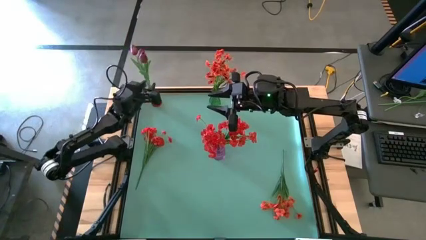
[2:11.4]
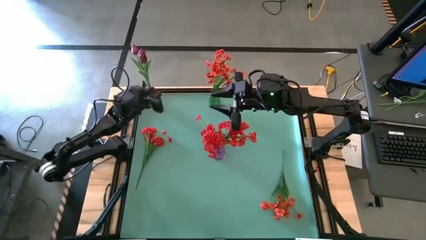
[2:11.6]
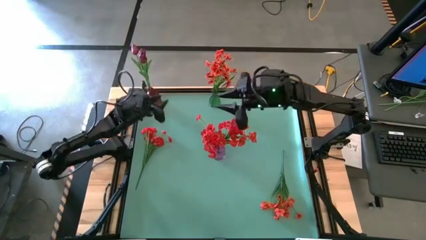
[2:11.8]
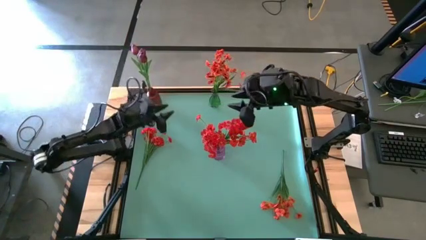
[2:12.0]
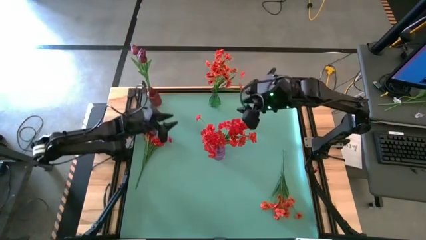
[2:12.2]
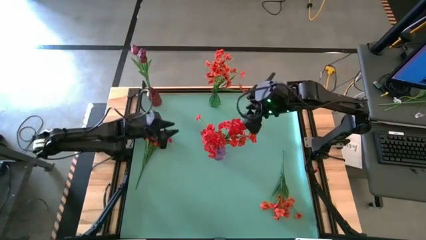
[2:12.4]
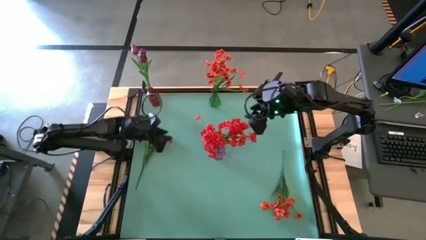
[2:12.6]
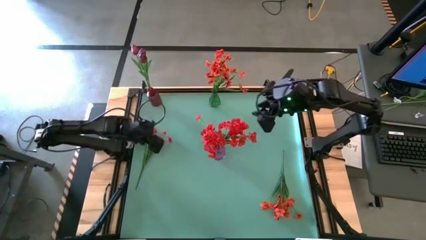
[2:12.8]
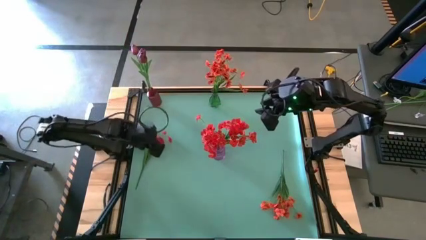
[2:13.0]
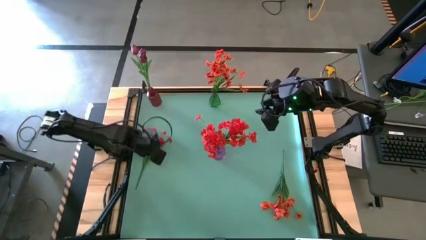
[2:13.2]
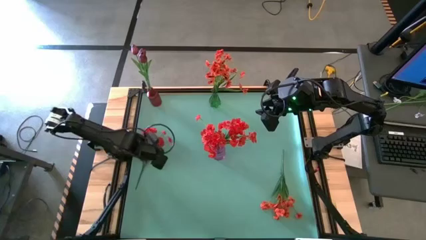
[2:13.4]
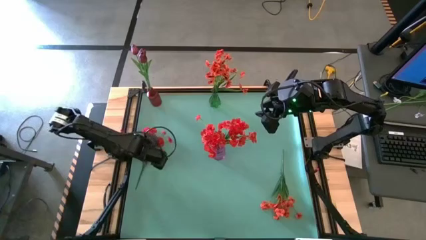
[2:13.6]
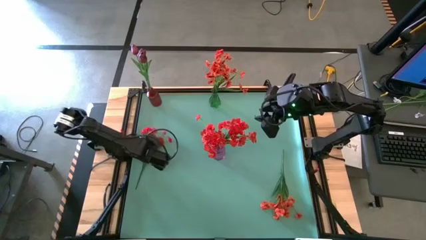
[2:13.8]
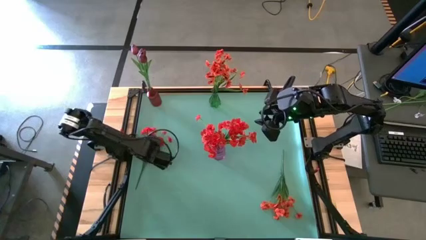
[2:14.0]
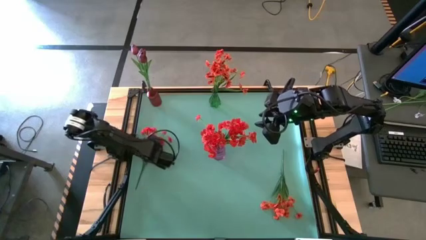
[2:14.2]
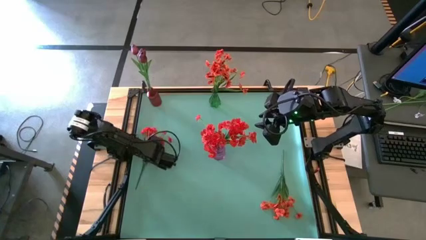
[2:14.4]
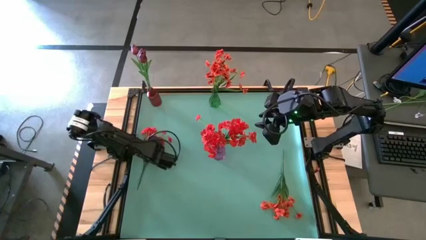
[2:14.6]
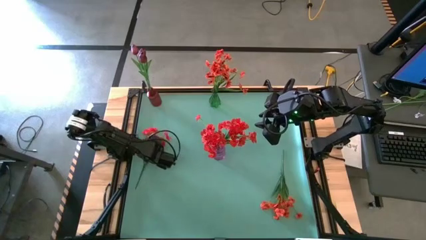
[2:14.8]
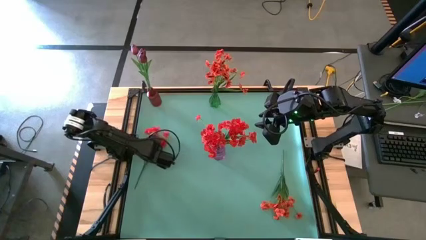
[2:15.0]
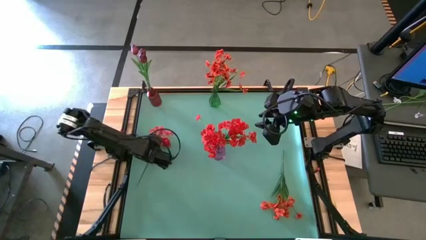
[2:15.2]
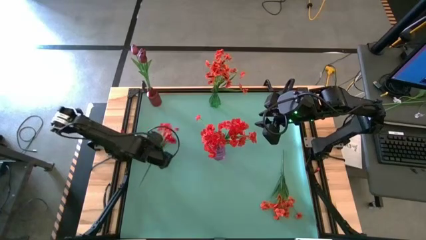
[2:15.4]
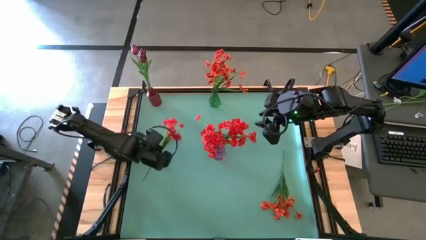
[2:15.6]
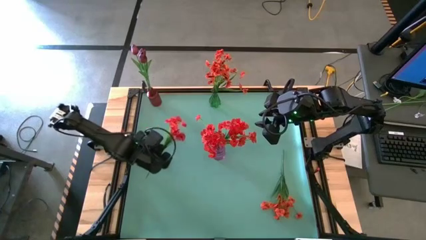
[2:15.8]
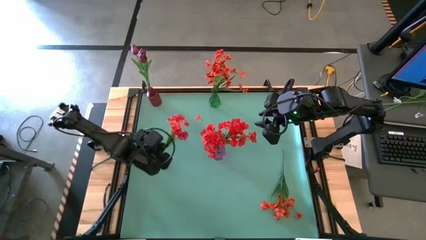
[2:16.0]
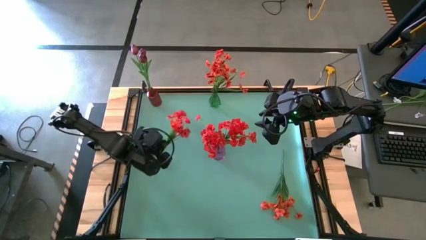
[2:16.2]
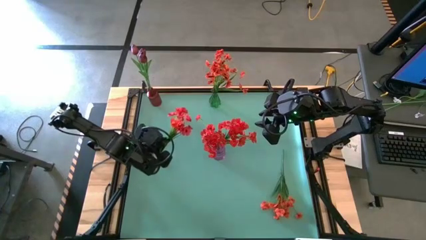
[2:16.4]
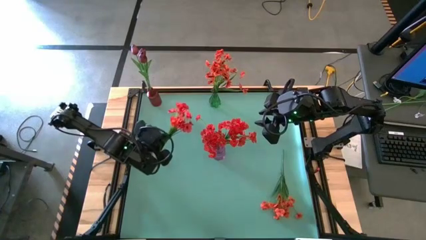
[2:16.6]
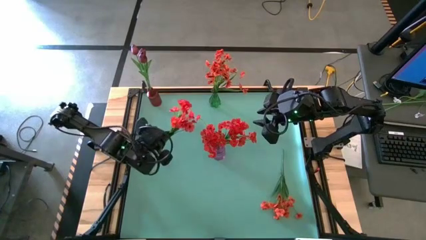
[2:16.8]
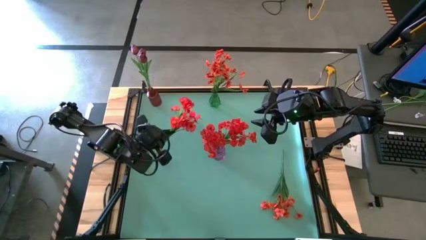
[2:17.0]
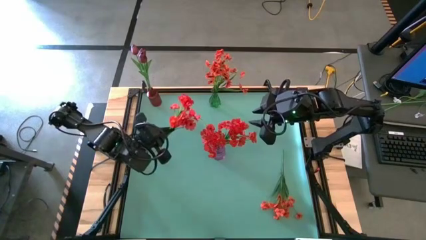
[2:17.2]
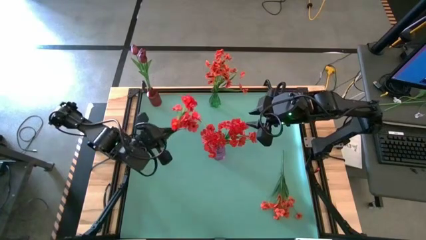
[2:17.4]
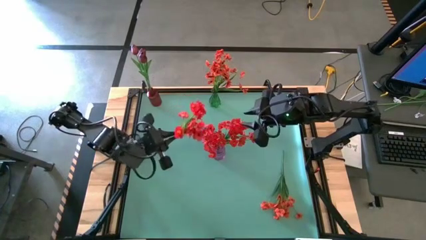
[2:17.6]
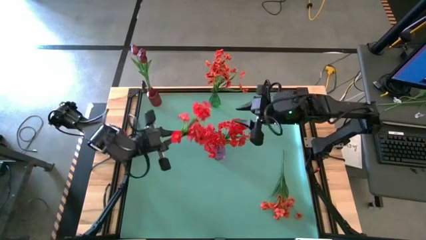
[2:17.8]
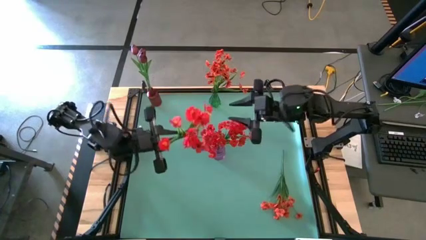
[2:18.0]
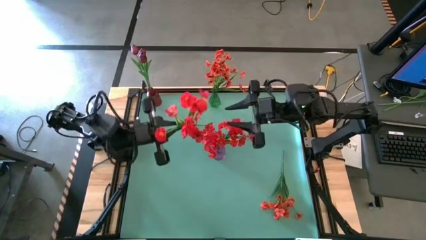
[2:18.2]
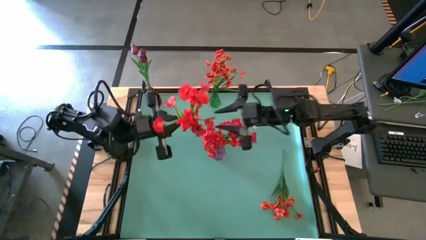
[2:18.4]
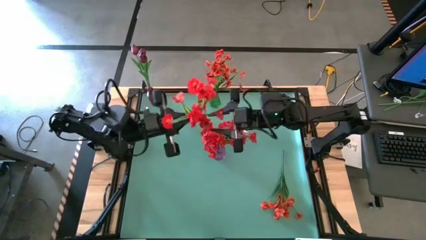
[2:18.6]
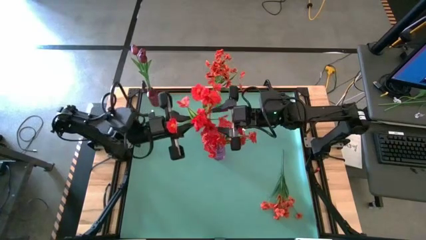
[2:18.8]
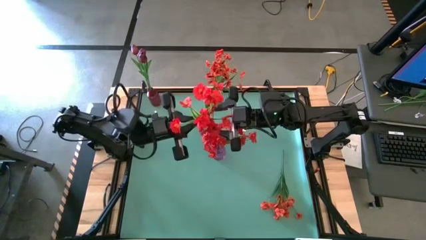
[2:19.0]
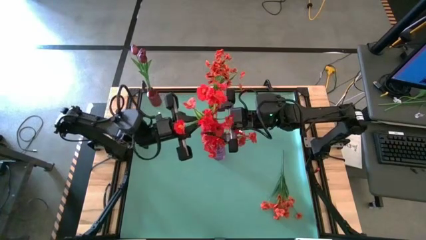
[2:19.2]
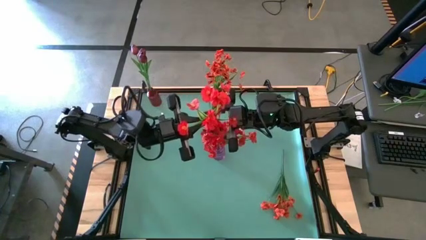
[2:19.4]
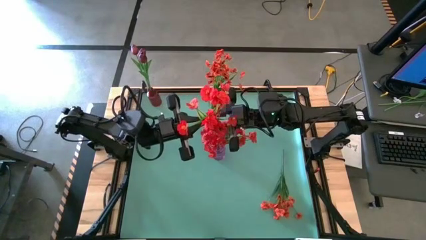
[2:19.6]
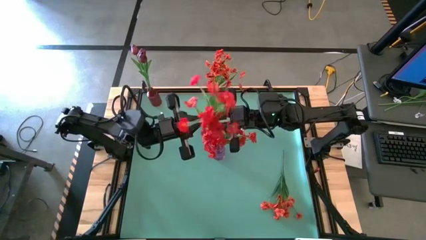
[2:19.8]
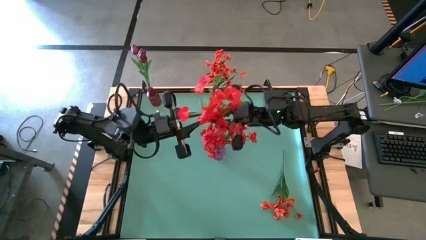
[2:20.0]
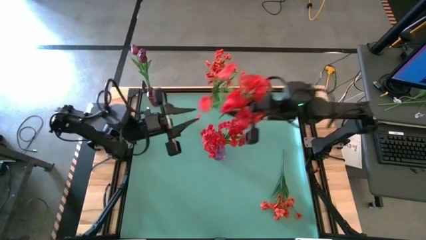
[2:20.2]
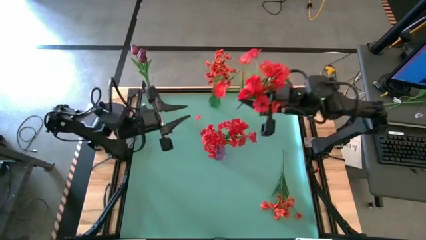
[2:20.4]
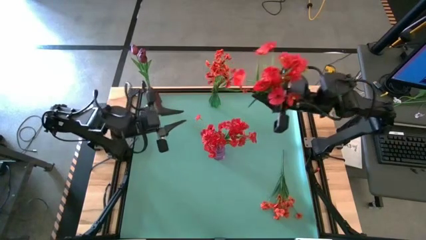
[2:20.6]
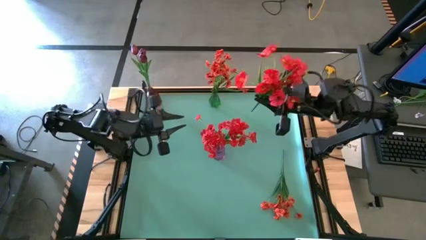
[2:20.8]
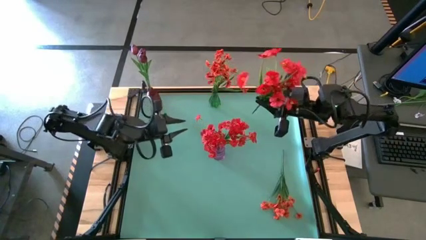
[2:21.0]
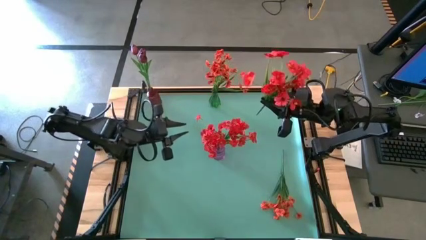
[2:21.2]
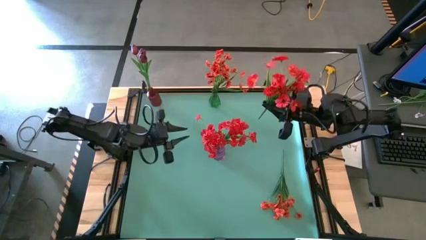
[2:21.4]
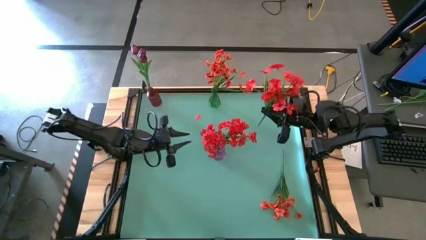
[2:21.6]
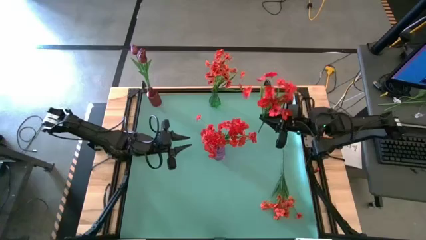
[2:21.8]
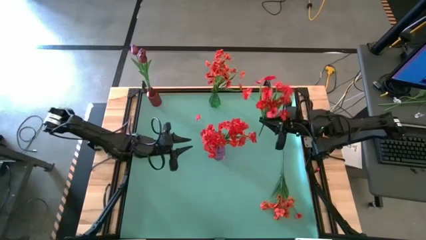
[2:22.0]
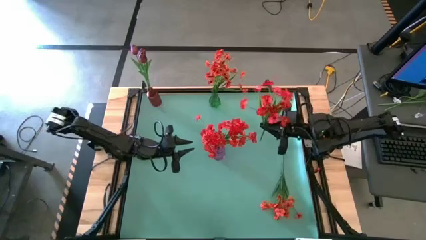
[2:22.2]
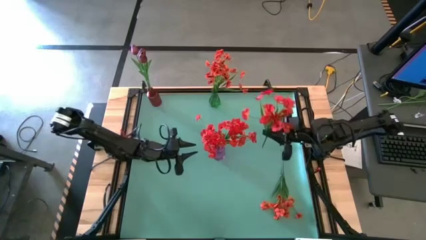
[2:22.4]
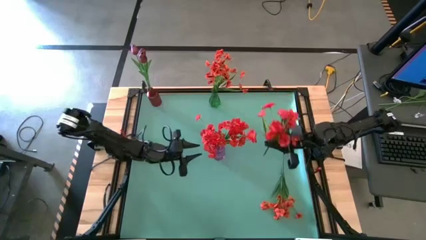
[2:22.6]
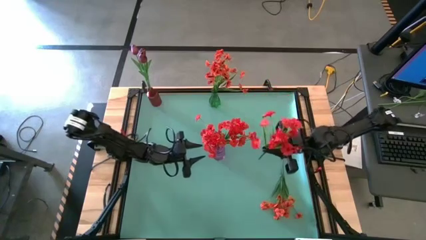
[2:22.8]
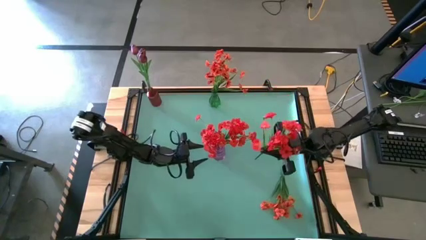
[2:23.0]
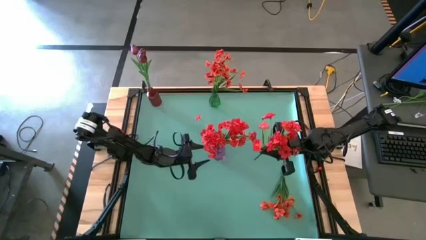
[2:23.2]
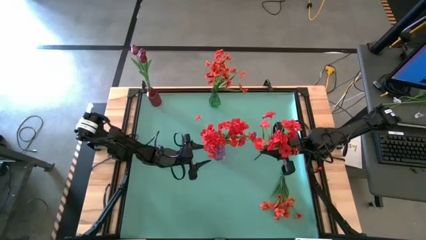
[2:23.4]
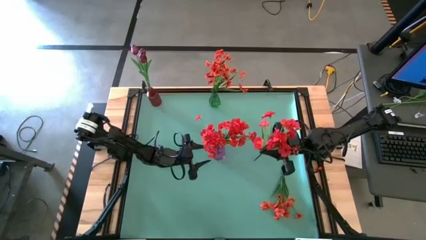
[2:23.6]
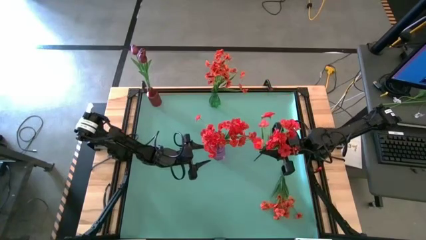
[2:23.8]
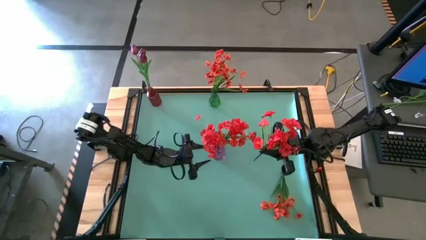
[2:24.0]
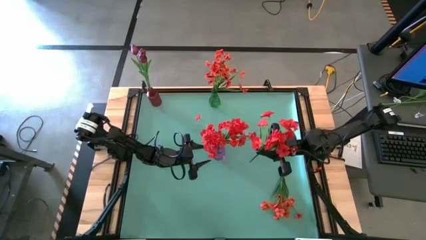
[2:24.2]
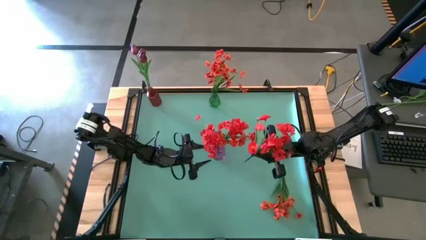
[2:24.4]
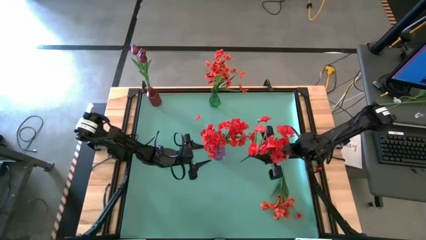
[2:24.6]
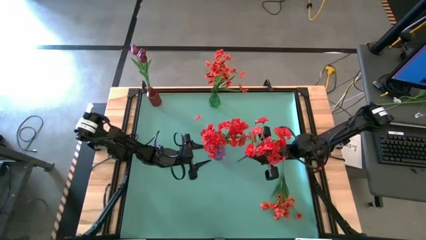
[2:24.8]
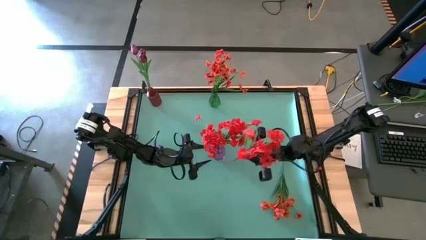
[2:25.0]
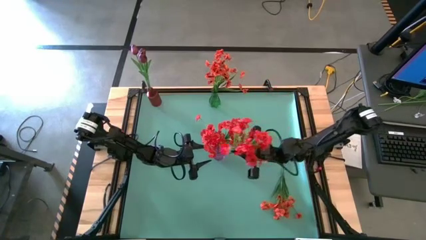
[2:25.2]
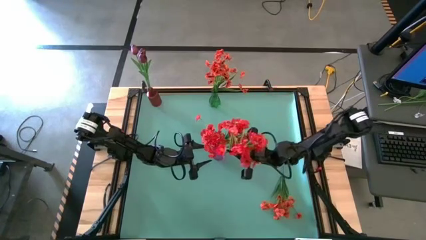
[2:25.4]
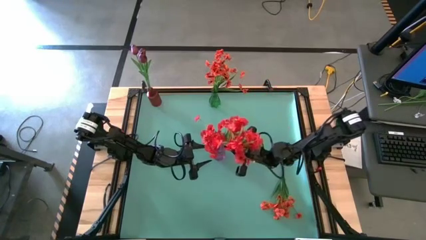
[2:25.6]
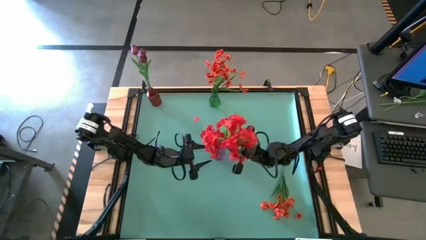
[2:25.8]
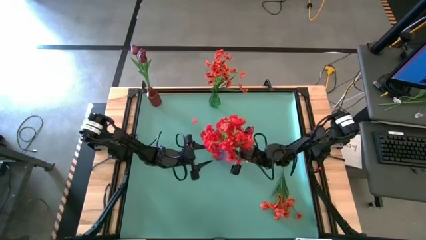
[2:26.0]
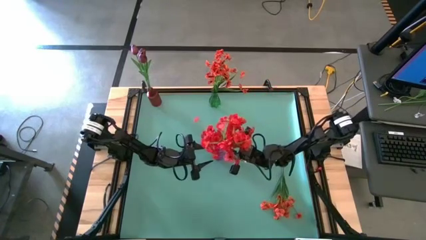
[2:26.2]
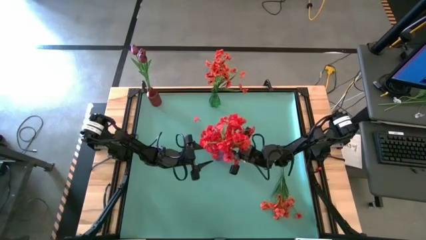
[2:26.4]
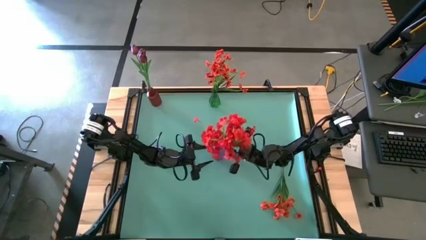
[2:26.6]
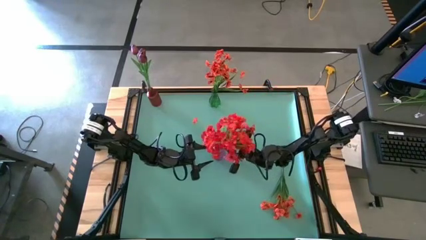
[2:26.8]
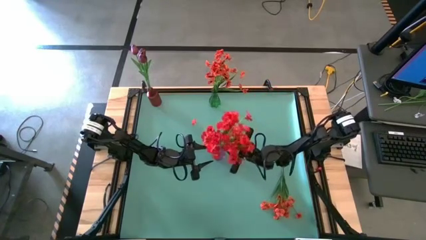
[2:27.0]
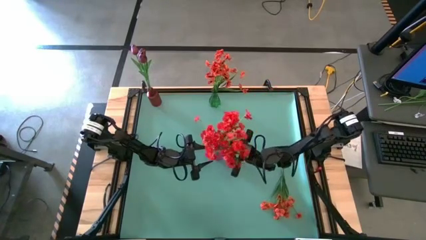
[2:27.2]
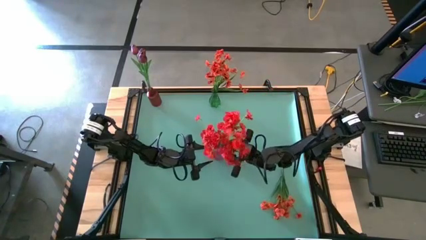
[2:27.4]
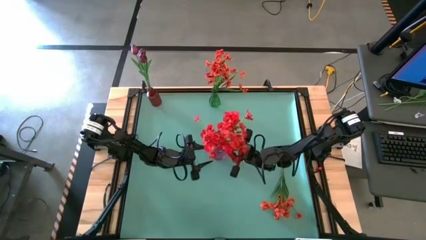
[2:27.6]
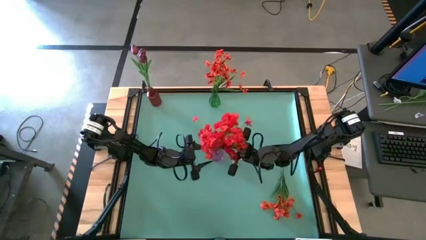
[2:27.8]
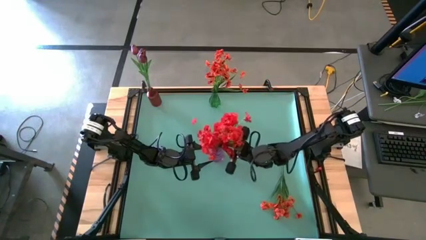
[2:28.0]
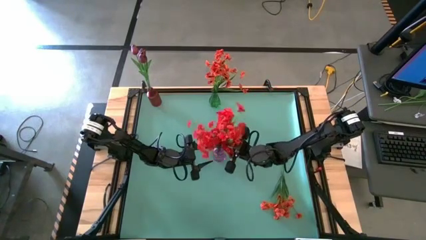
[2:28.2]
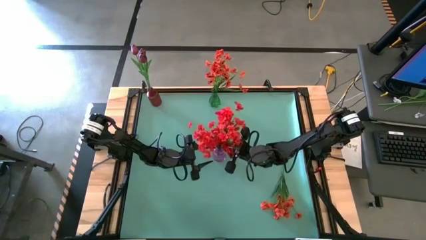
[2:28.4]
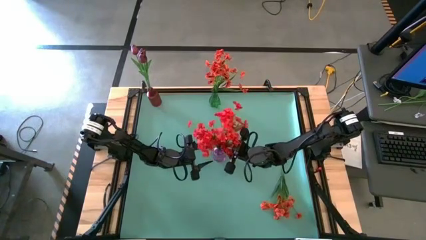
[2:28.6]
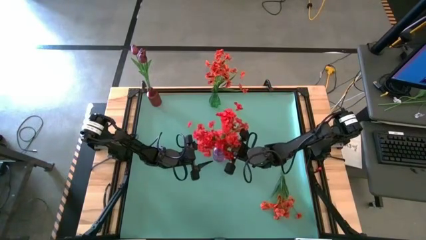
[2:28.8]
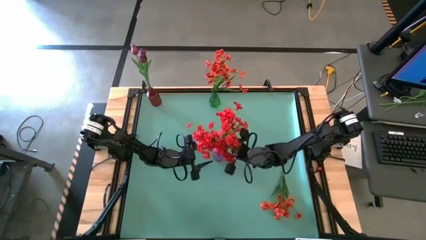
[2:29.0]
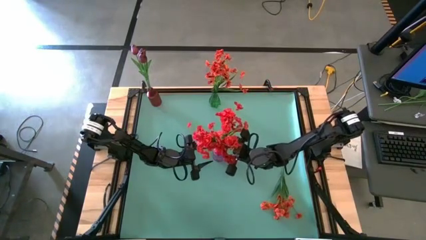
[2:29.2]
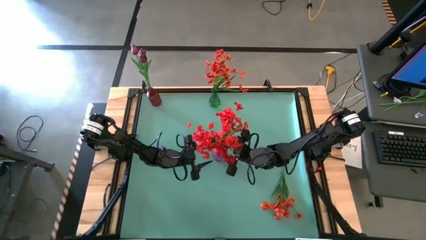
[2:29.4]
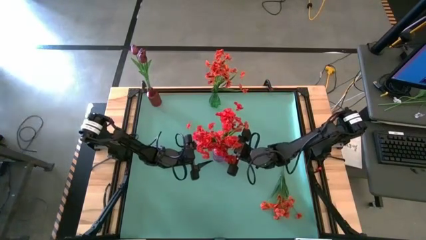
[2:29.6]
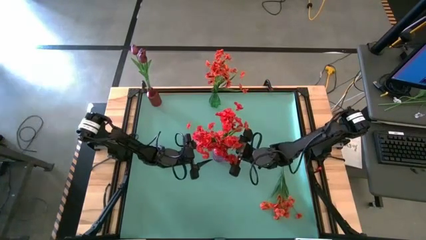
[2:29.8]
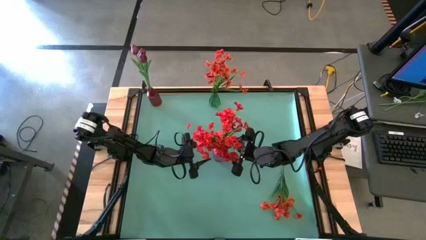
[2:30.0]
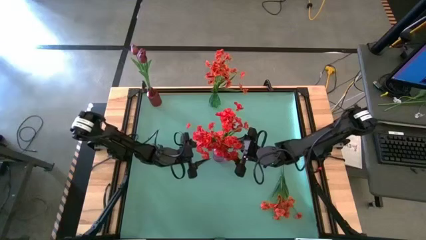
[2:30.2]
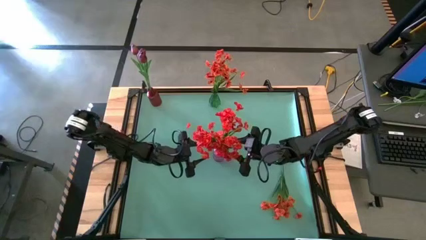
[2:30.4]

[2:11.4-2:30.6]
Task: Sort flowers into vase by color
Put the orange flowers into the purple vase
